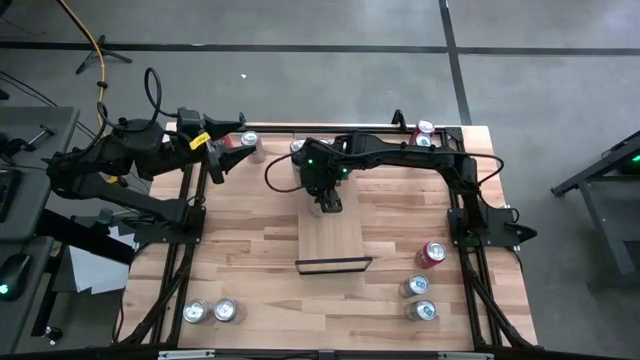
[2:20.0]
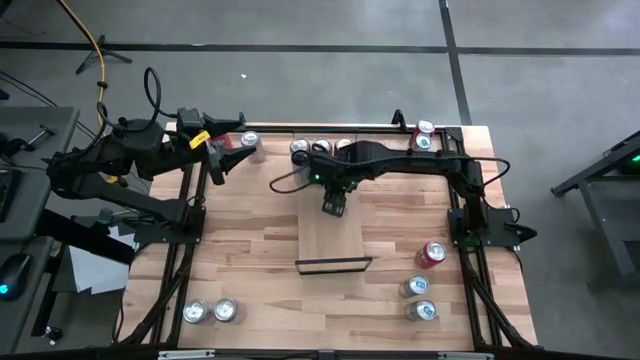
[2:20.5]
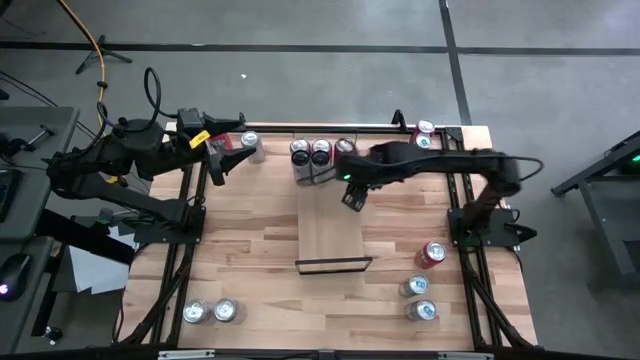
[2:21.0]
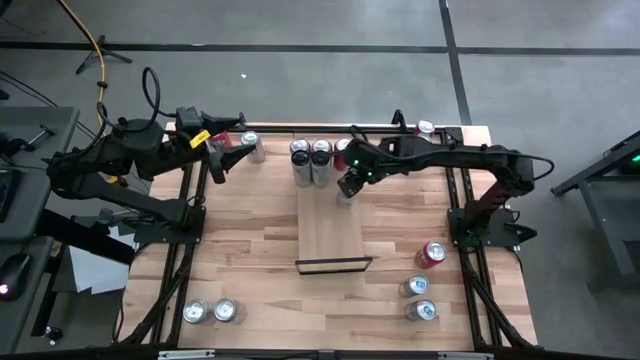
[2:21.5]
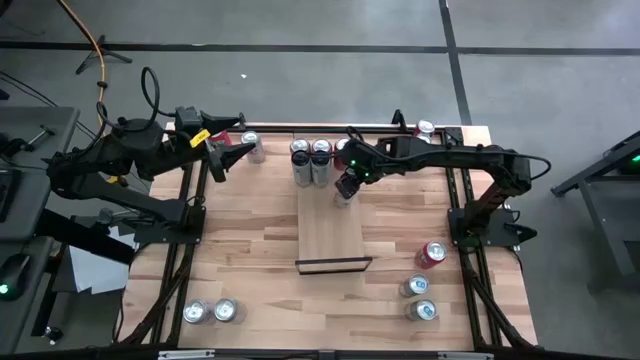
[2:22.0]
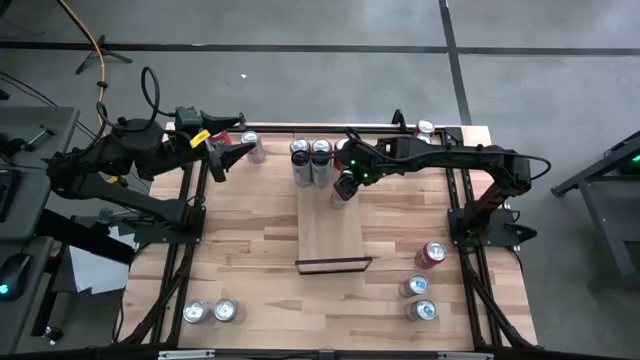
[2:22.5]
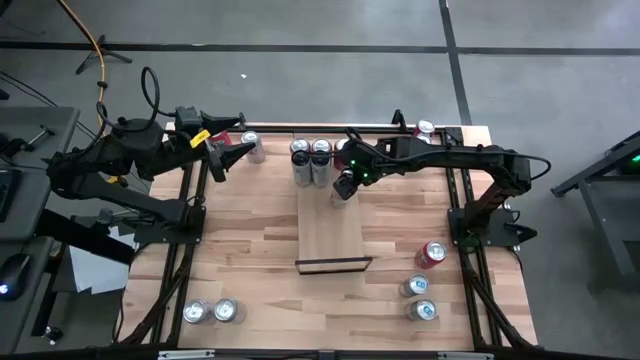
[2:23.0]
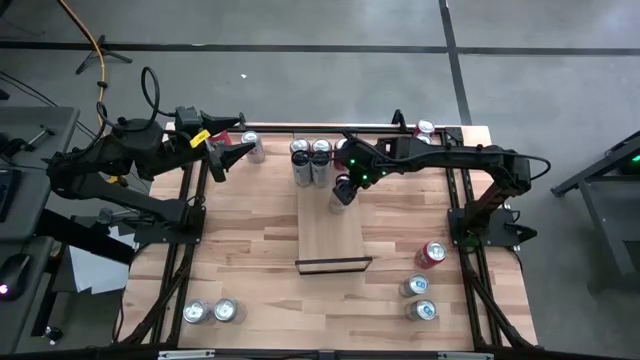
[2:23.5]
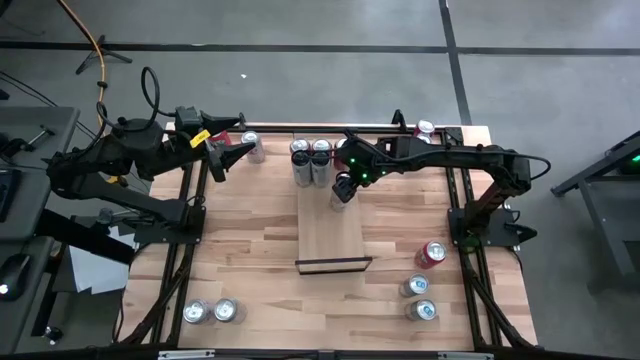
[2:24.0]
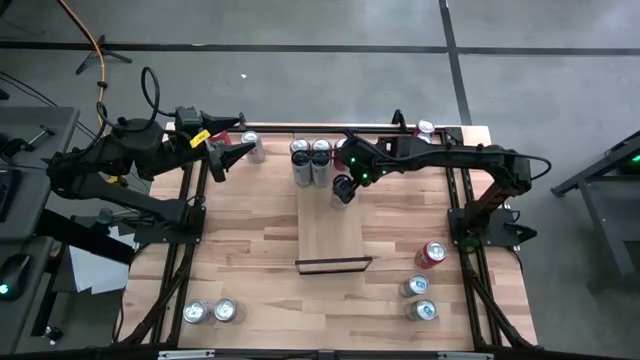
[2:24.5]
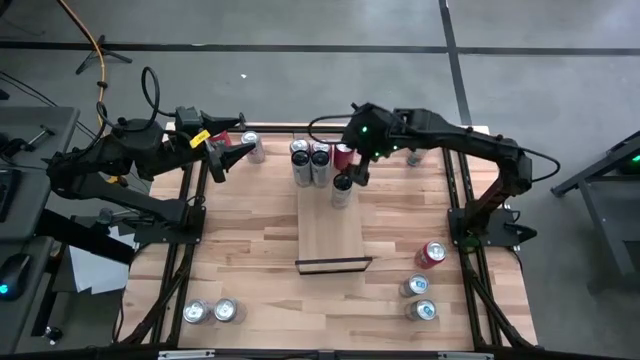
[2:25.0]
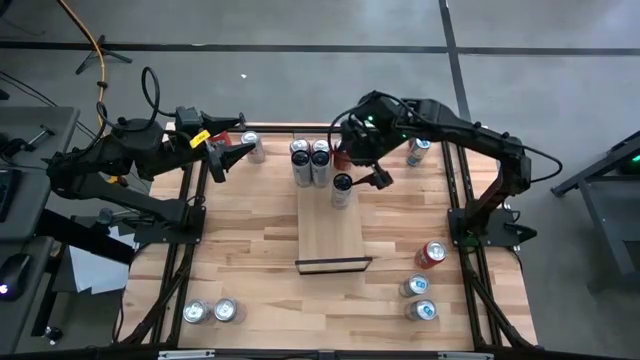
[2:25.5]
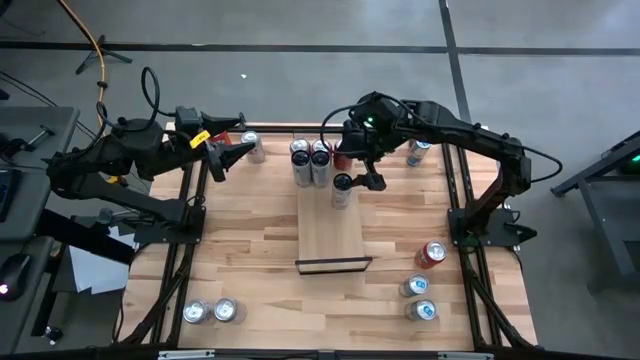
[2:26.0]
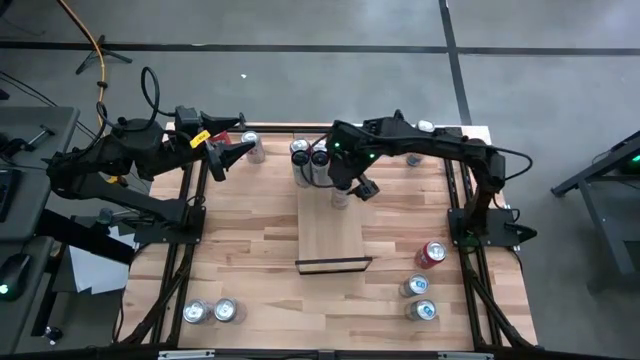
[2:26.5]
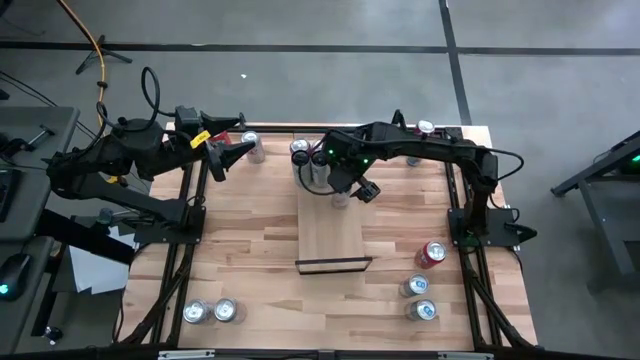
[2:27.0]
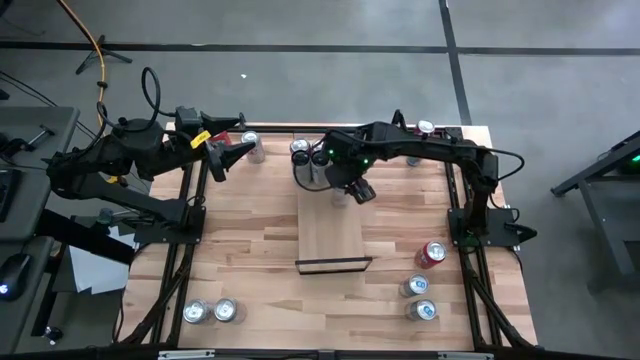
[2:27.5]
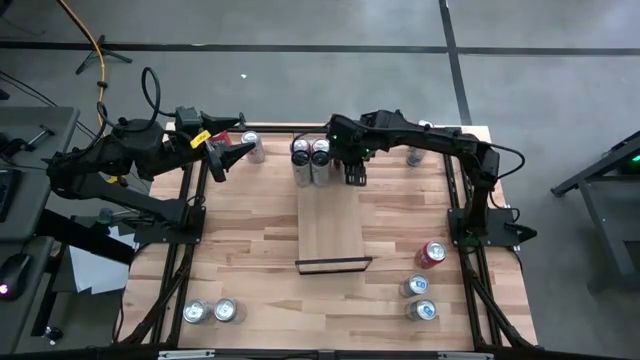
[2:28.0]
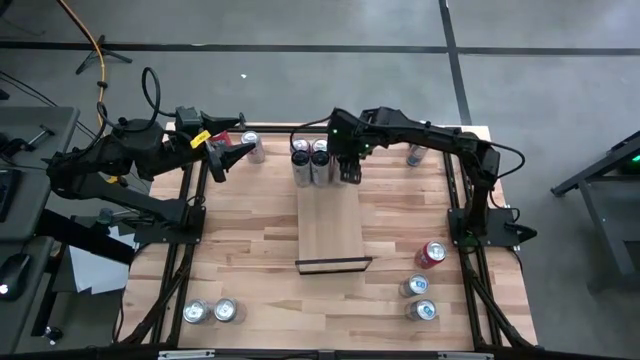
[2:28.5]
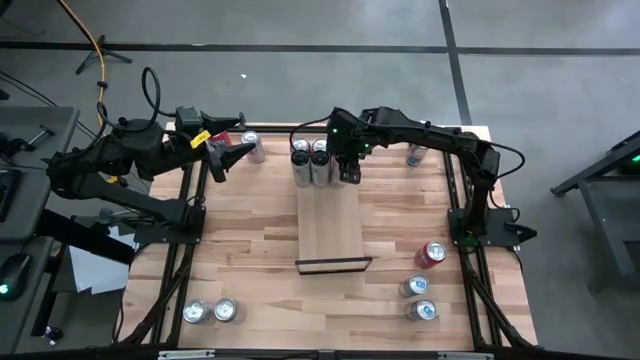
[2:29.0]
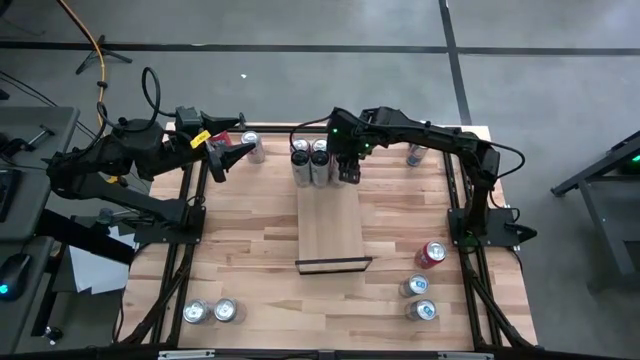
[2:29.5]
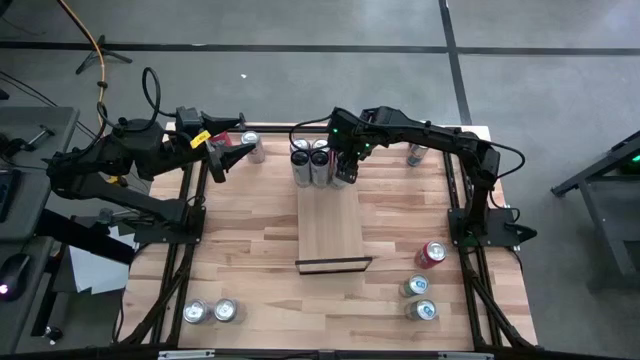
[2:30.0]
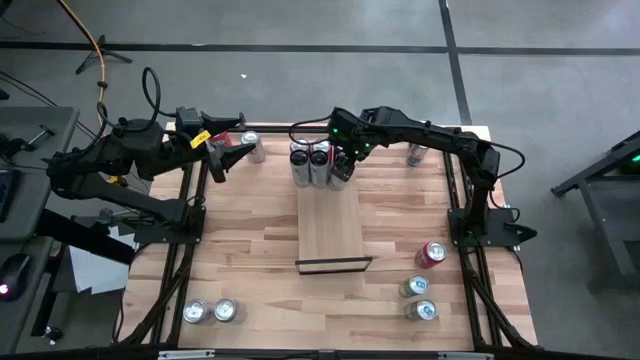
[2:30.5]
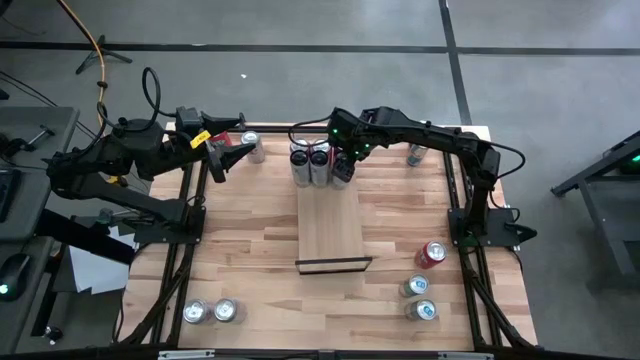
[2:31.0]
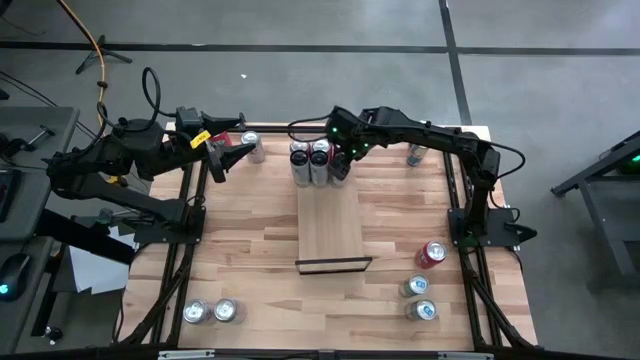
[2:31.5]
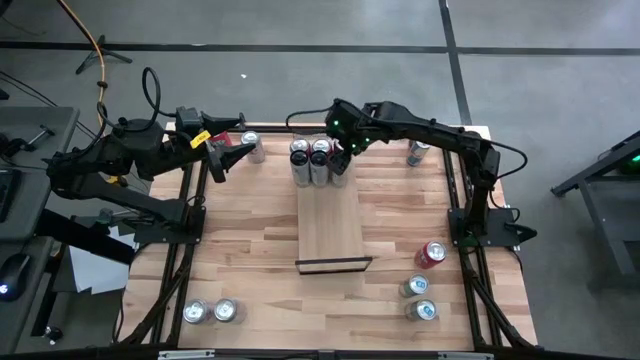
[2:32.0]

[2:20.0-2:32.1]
Task: Place canned beverage on shelf
Put the black soda can on the shelf aligned with the other black soda can

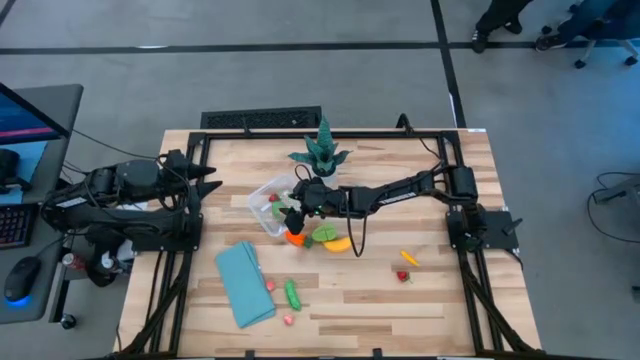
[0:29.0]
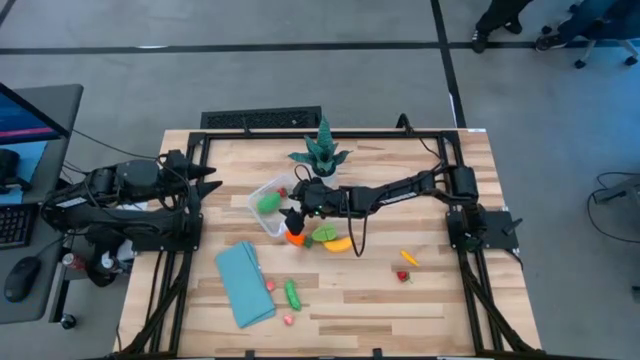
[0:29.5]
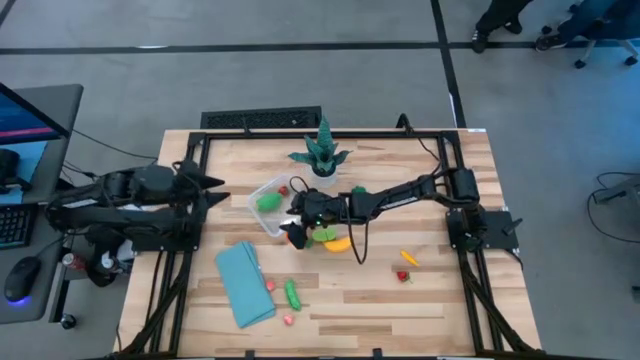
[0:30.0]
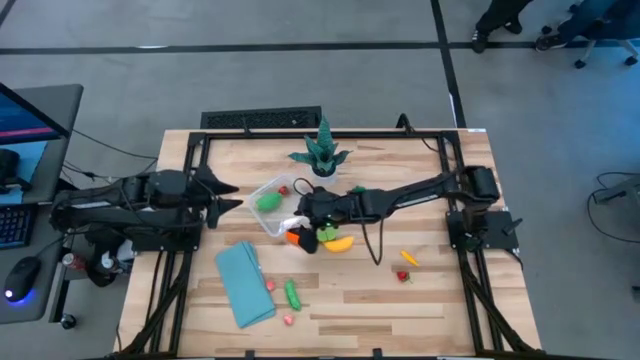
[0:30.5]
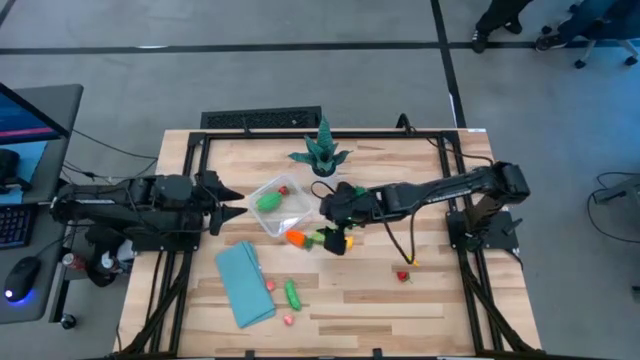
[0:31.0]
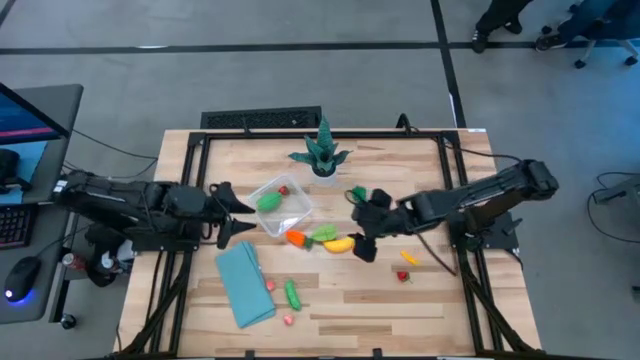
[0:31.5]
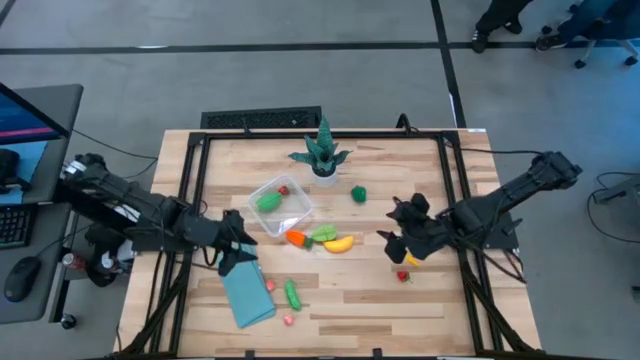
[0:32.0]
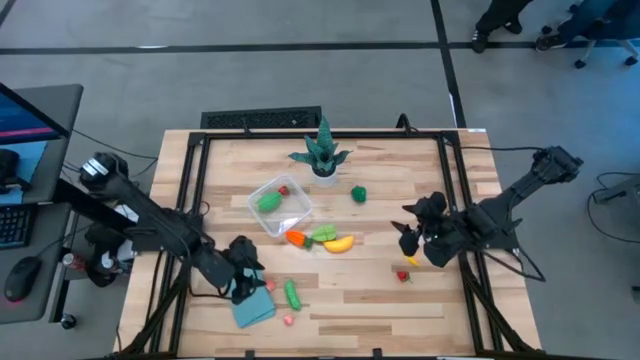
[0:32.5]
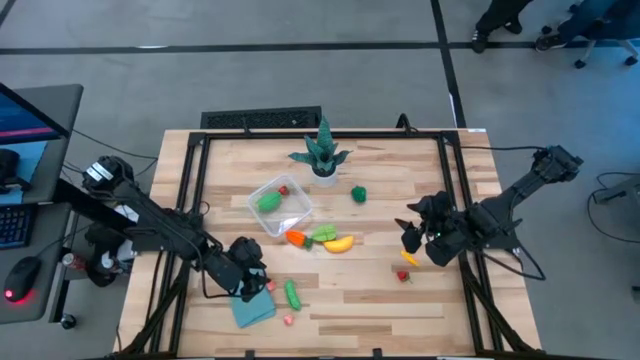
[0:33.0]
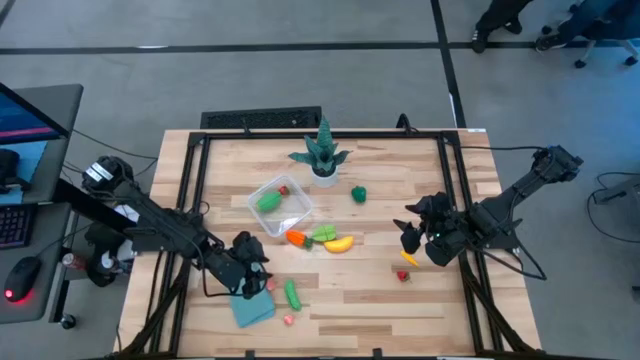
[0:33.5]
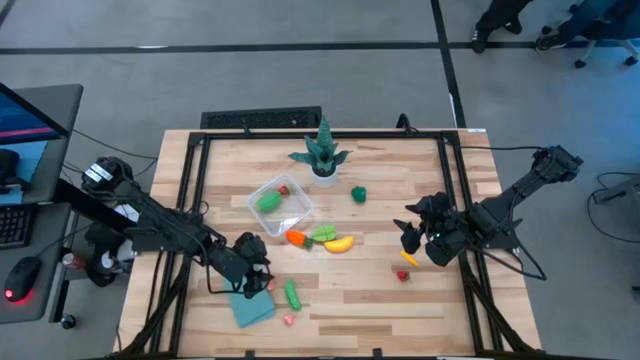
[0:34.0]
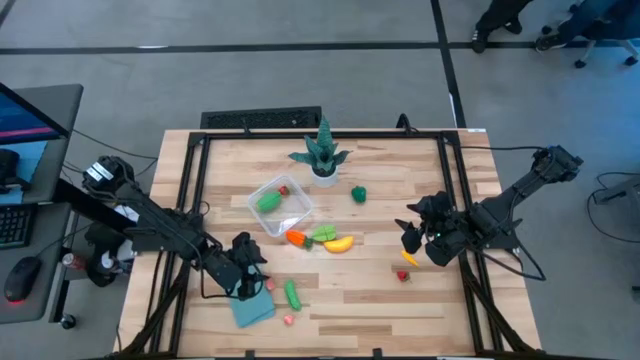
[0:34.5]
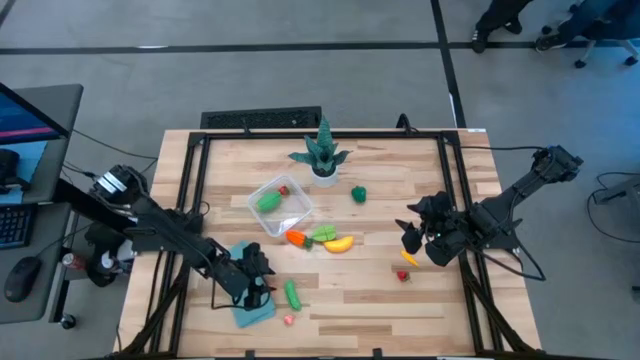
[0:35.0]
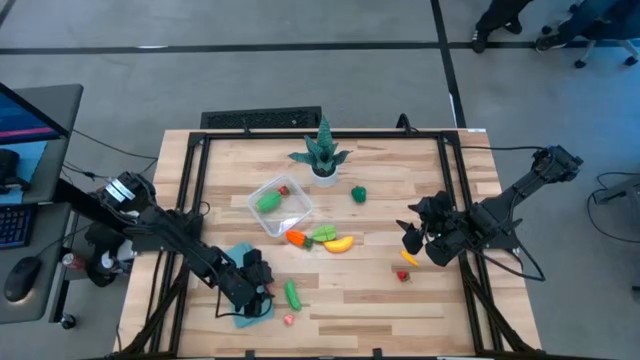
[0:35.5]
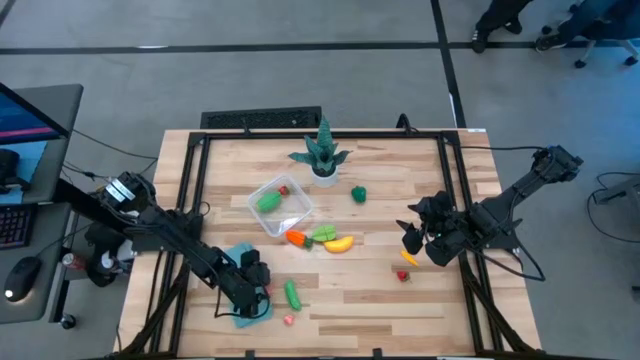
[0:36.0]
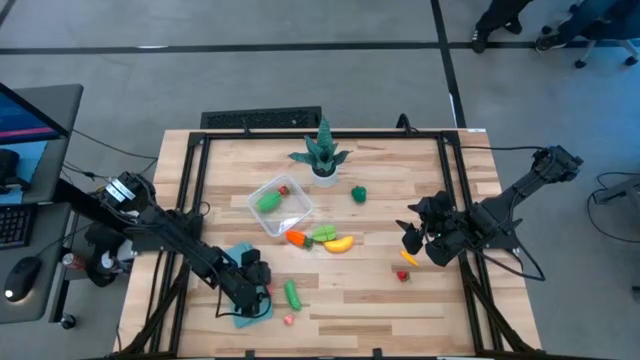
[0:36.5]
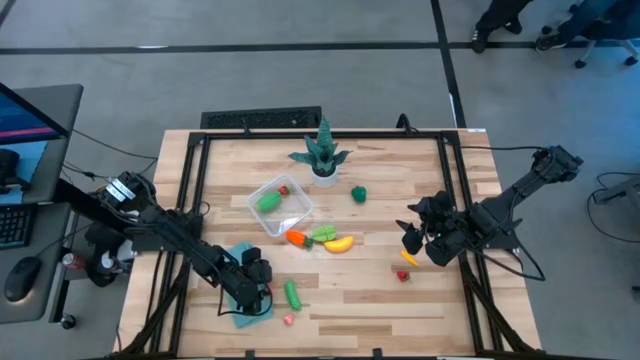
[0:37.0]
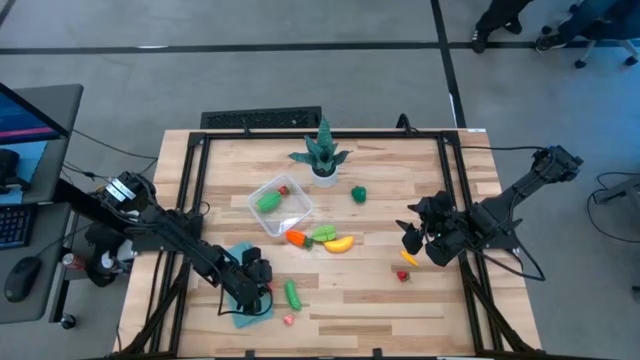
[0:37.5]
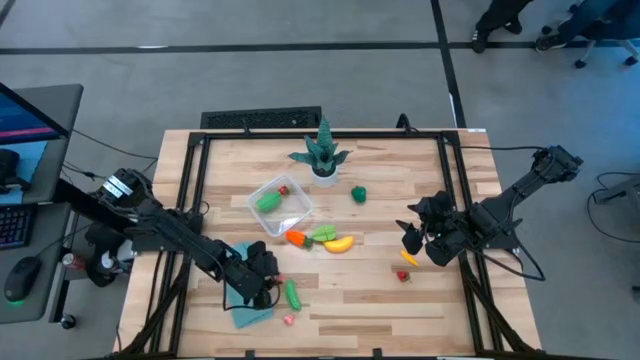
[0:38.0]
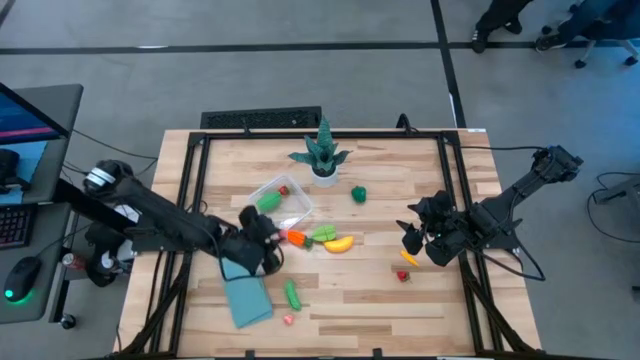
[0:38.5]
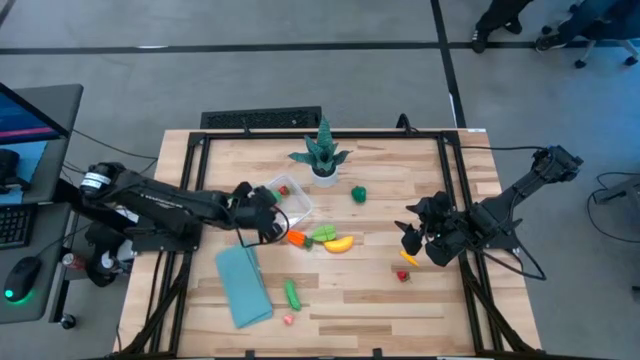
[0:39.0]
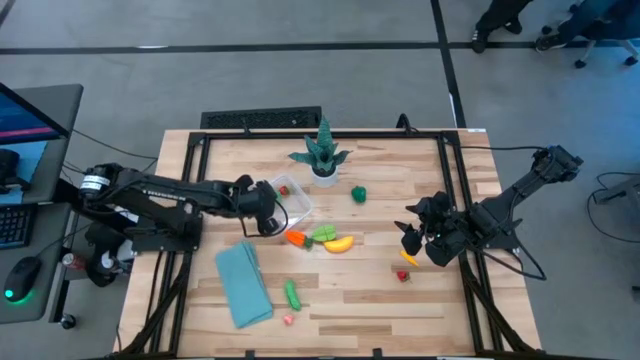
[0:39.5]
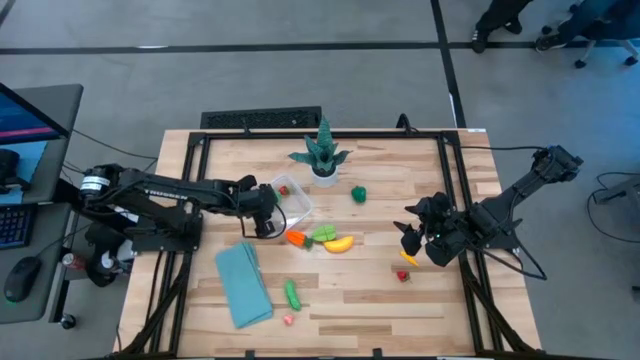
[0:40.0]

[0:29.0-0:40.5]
Task: Pick and placing Produce into tupperware
Put the left pink peach into the transparent container
